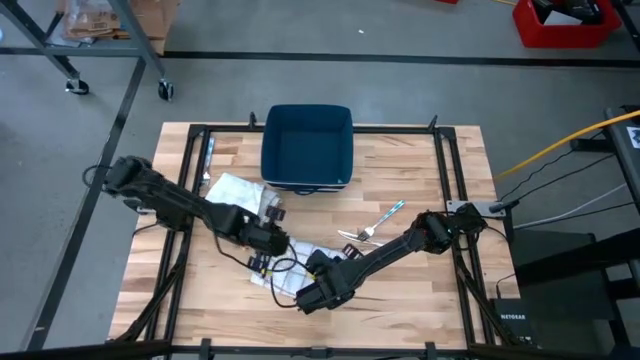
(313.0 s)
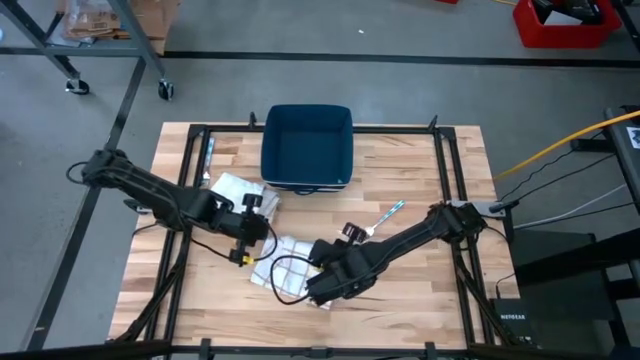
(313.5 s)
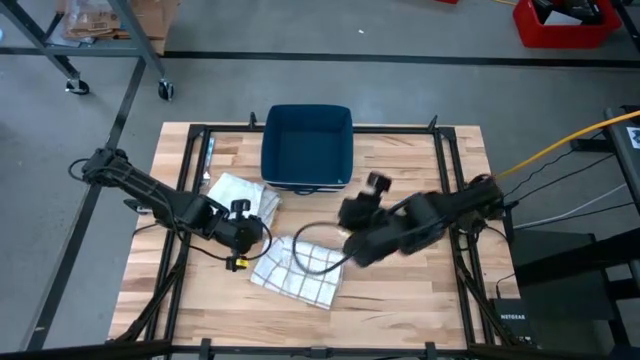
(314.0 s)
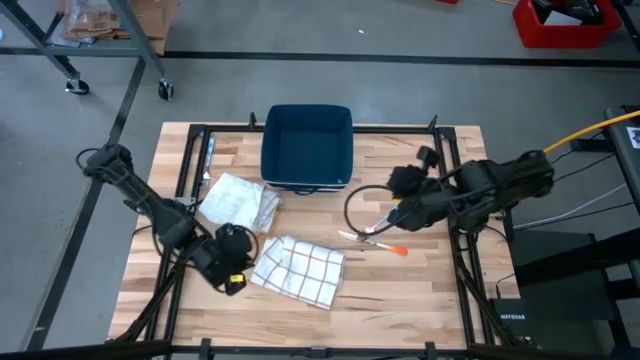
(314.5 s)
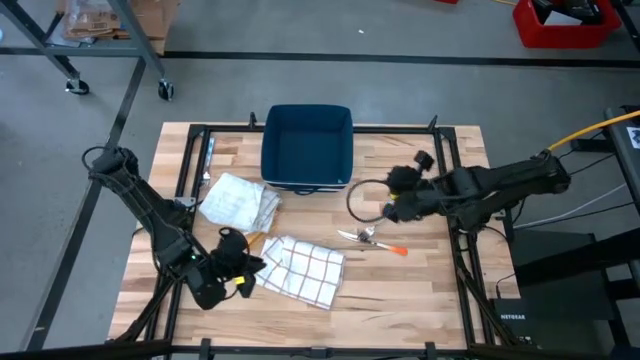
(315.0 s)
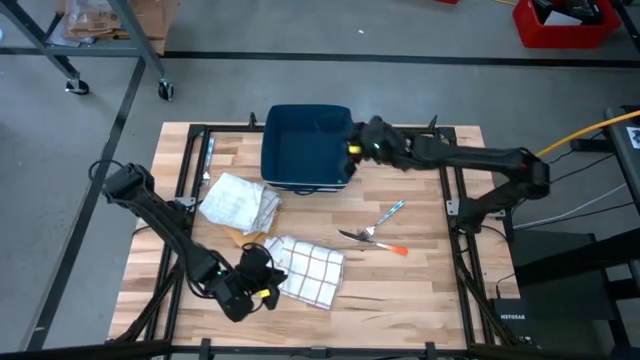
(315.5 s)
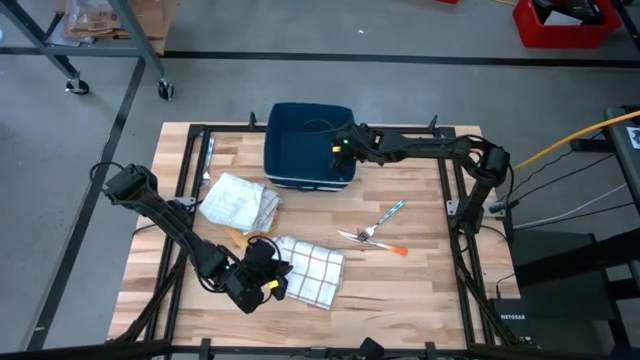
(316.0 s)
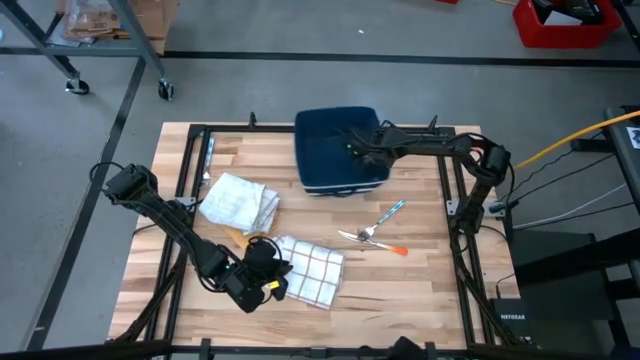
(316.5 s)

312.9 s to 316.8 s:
Task: Fold towel
Adjust the blue laundry organizer on the table

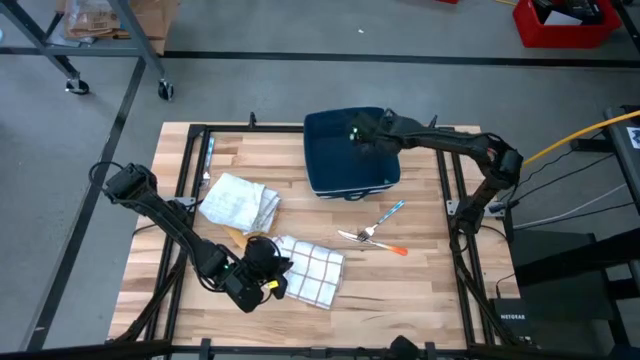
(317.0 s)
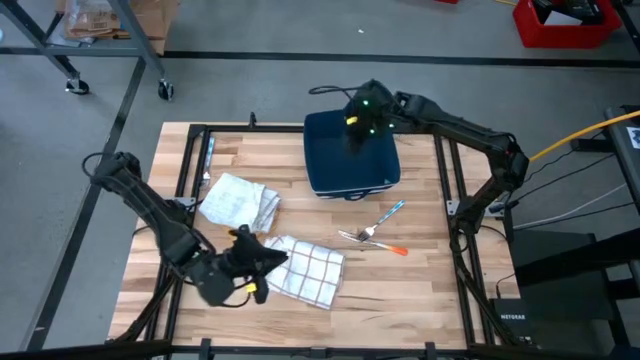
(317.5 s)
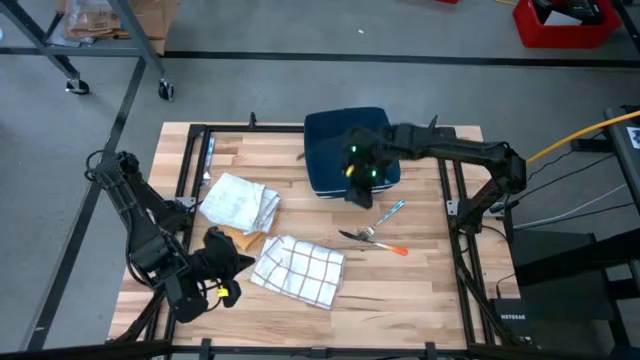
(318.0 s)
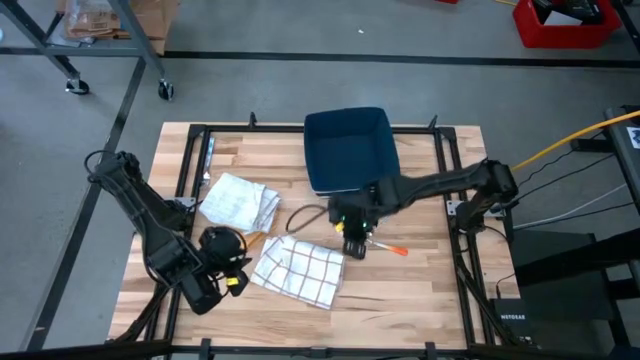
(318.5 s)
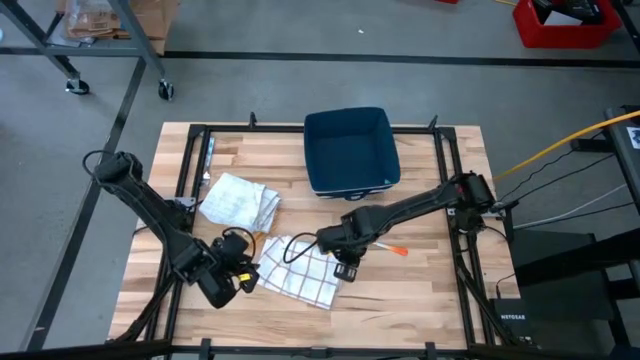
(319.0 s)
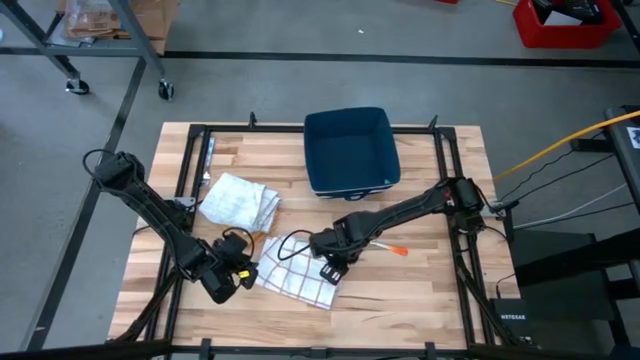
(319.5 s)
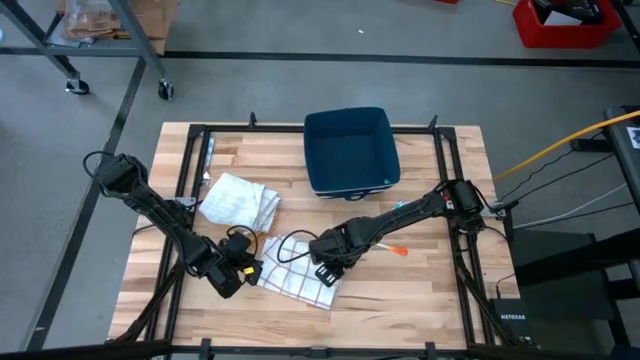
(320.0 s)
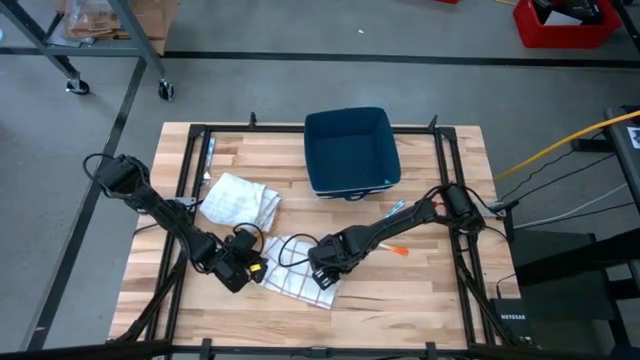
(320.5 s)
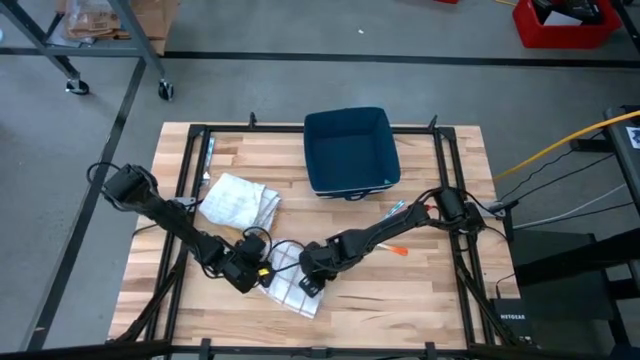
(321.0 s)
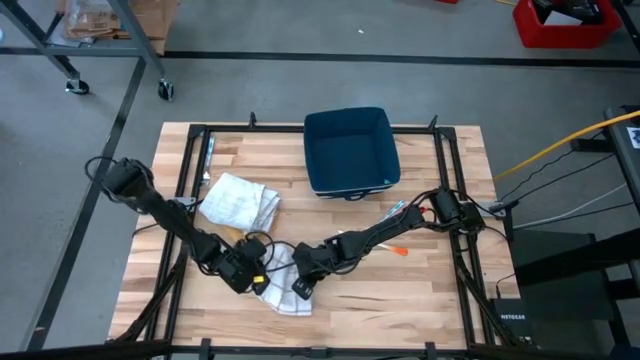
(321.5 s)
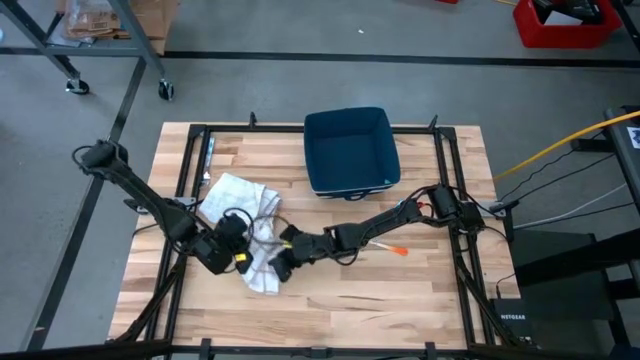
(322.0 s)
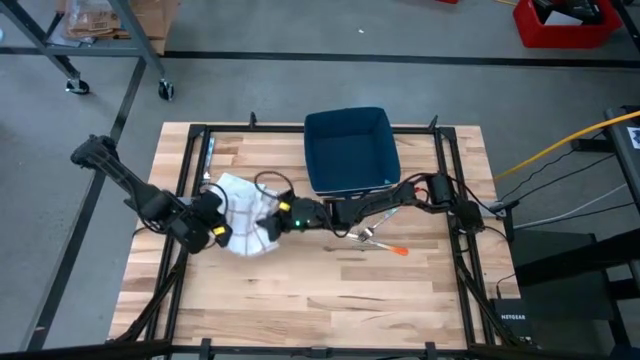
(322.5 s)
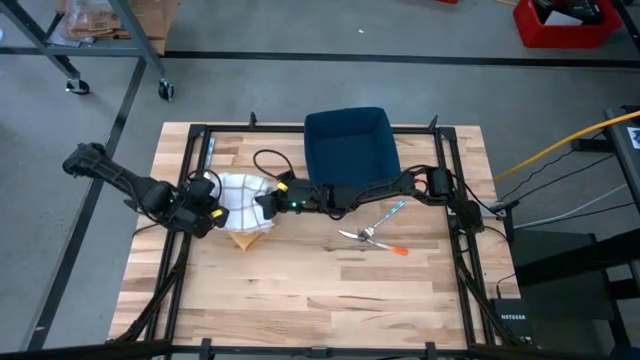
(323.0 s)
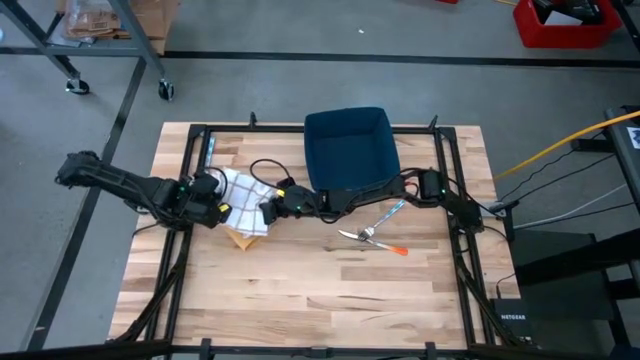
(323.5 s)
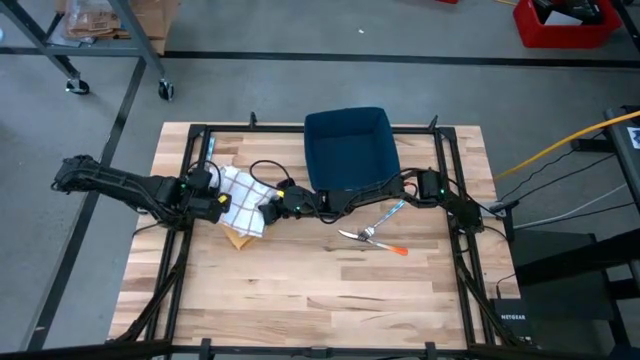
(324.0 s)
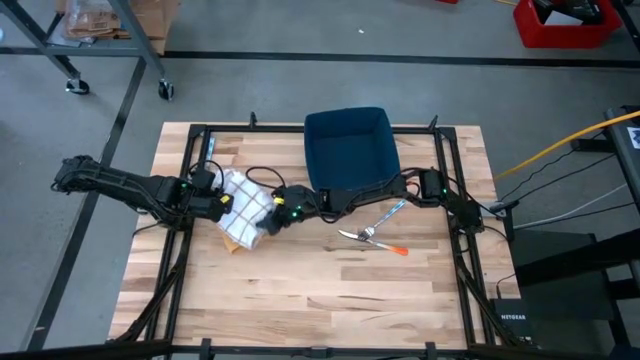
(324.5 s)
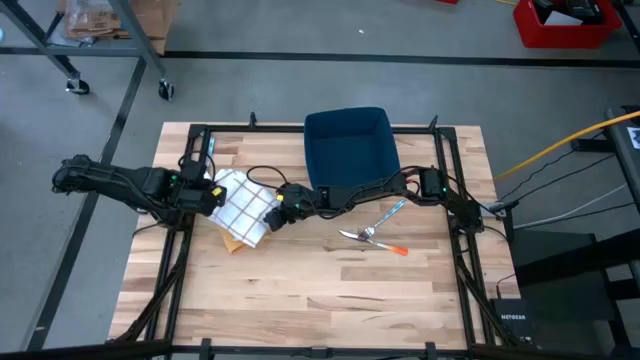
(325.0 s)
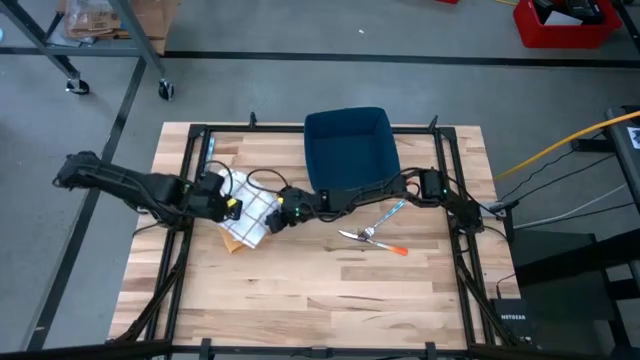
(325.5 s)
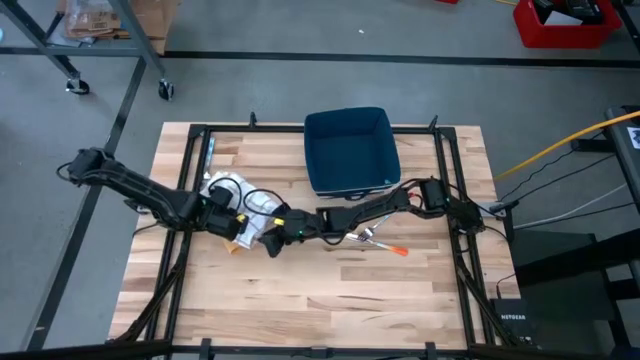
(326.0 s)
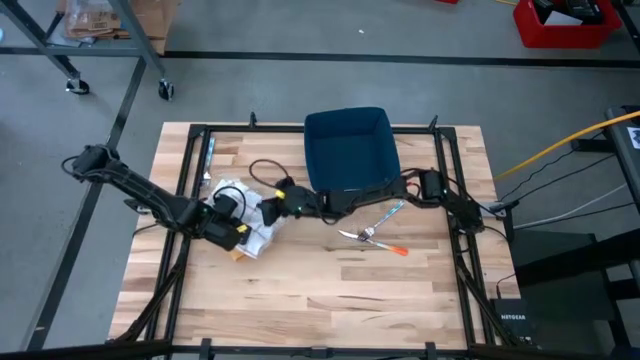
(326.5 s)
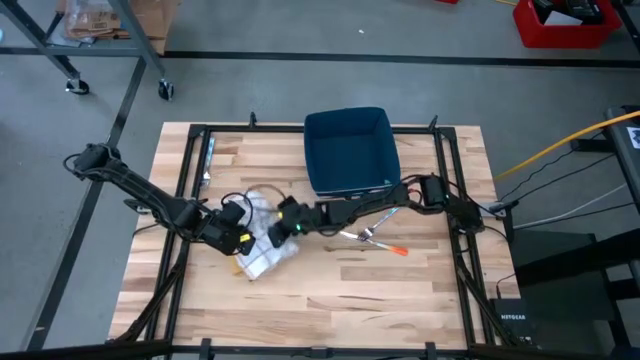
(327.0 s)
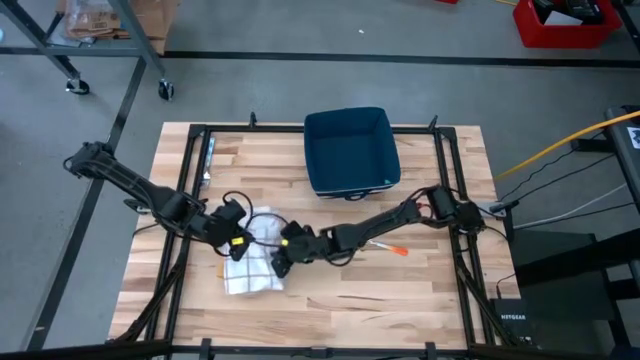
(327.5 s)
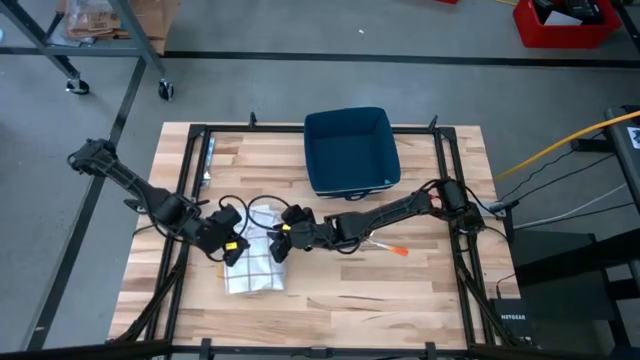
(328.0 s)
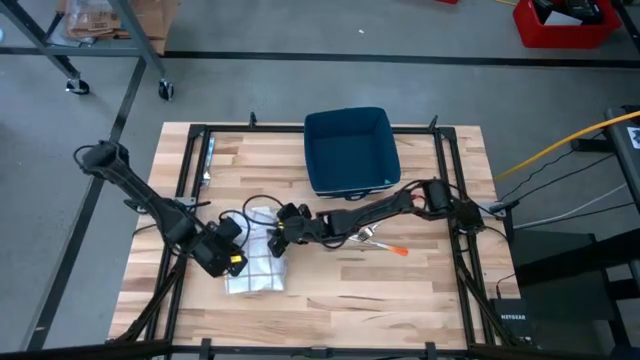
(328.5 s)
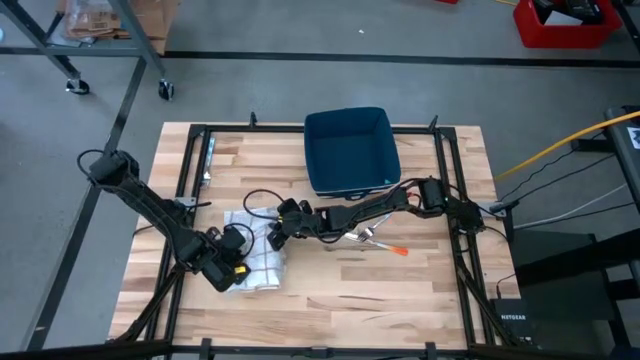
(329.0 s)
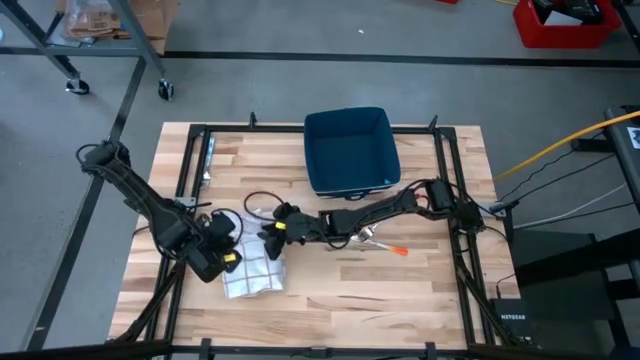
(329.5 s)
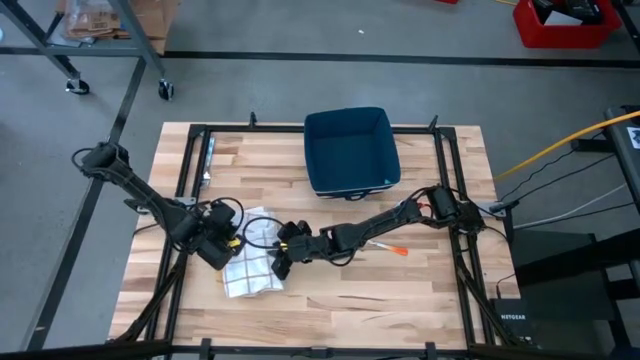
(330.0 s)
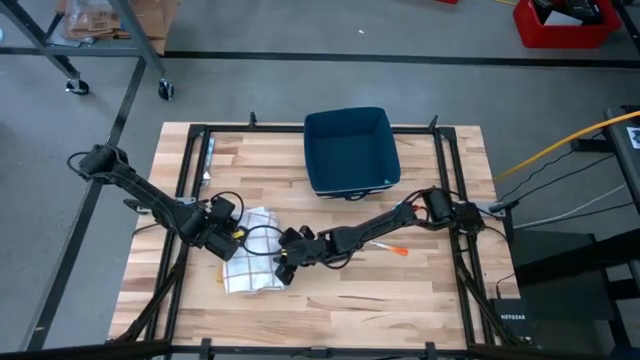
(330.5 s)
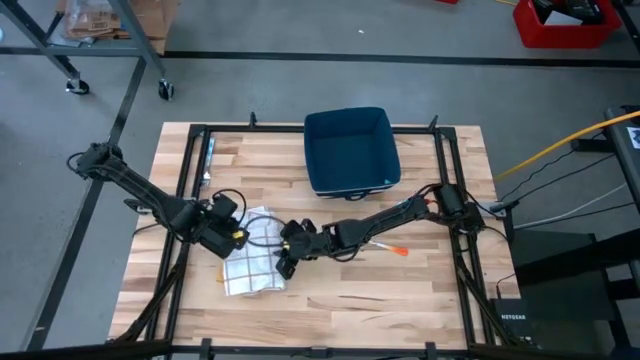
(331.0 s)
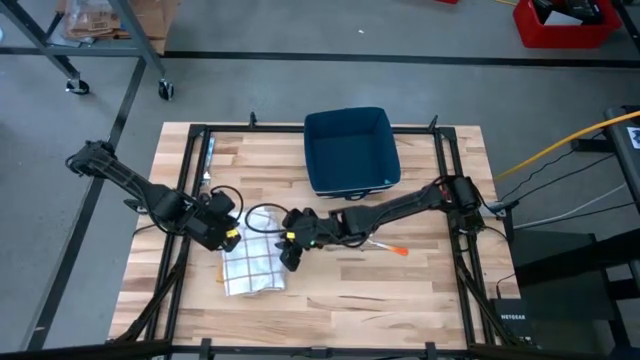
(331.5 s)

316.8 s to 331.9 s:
Stack the folded white patterned towel on top of the other patterned white towel

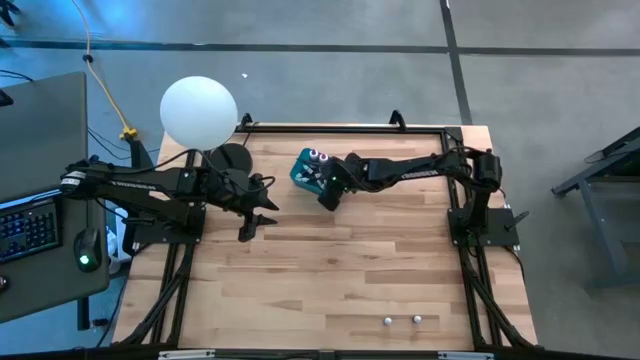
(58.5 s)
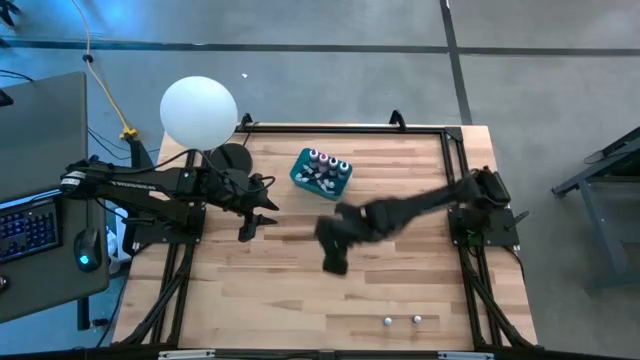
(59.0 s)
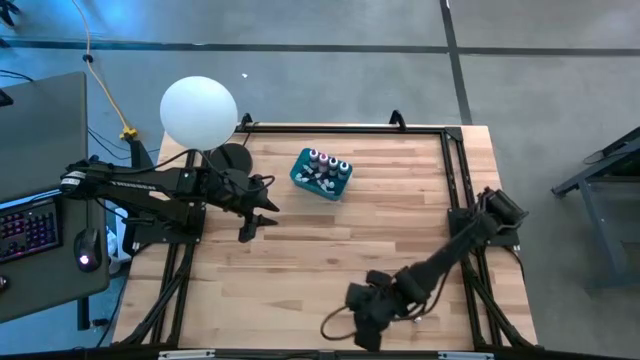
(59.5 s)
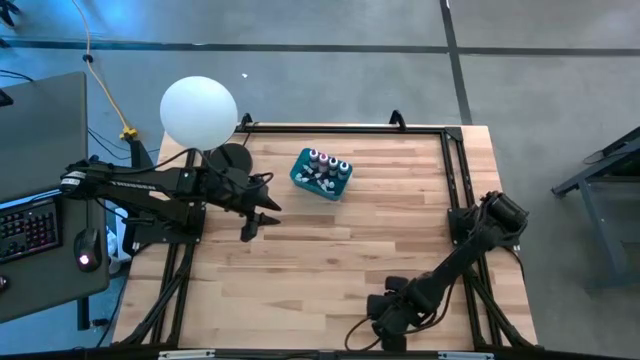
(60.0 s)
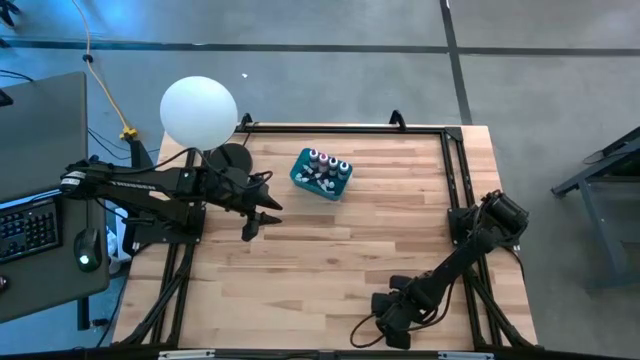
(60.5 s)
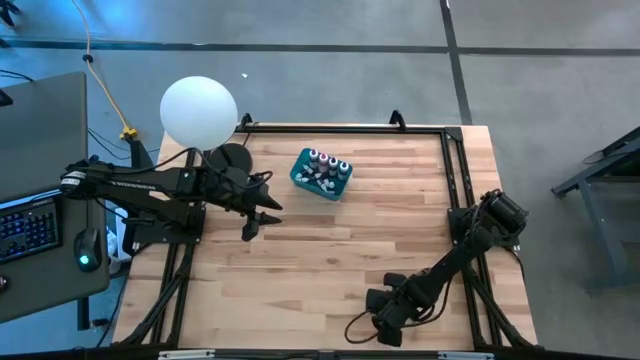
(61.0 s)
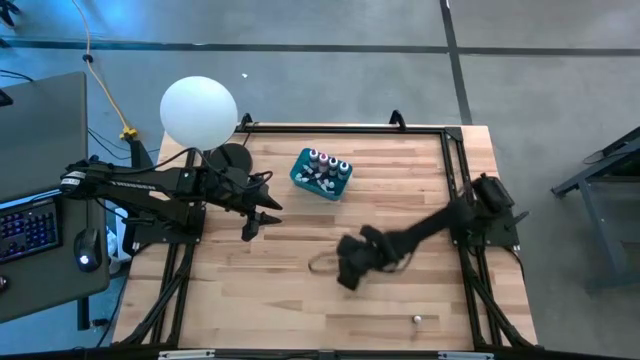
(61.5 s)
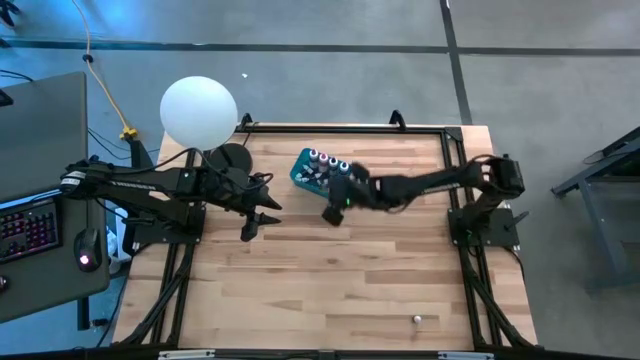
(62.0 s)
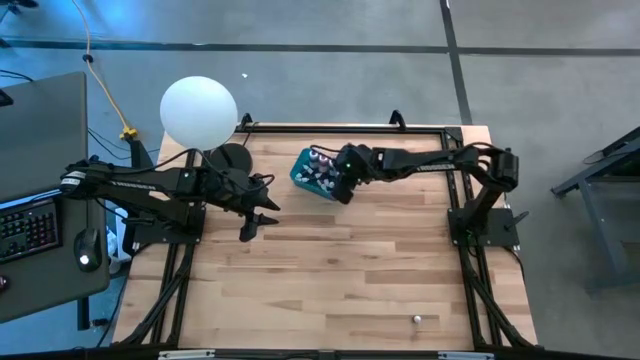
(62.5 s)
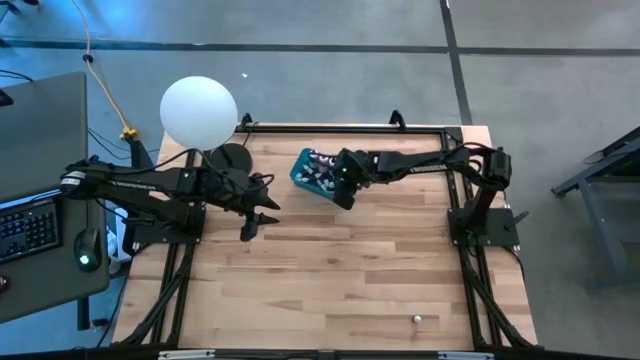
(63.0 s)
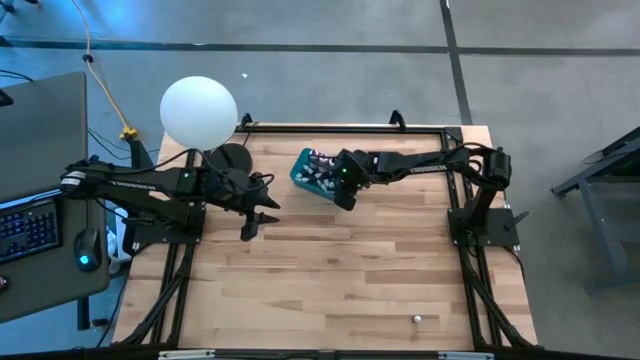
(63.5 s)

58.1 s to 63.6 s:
Task: Pick & Place food coloring
Put the blue food coloring bottle into the blue bin
